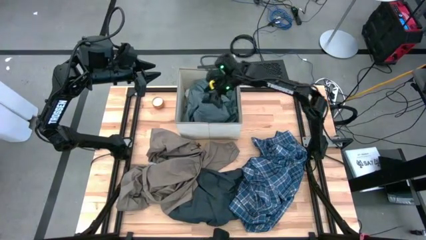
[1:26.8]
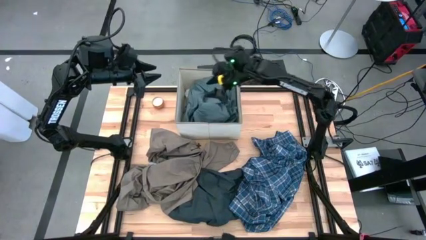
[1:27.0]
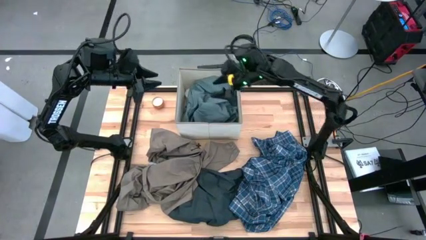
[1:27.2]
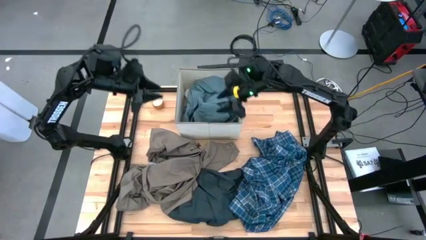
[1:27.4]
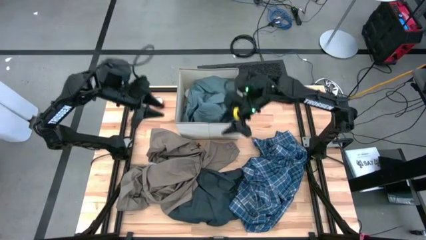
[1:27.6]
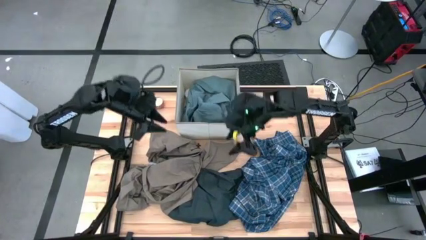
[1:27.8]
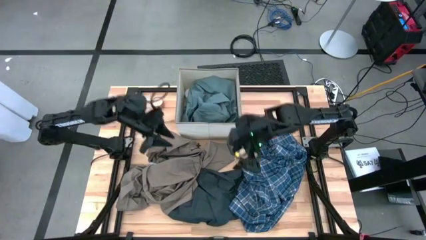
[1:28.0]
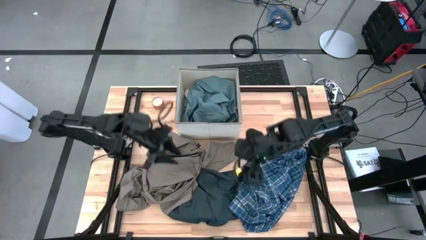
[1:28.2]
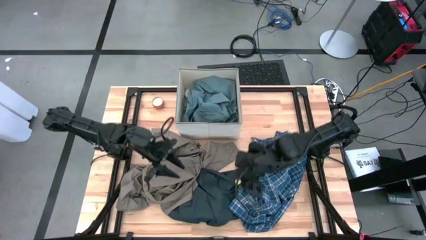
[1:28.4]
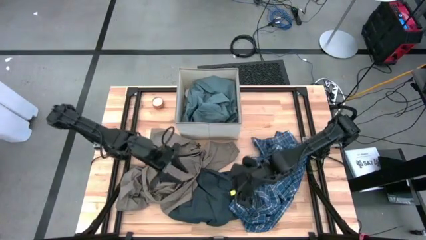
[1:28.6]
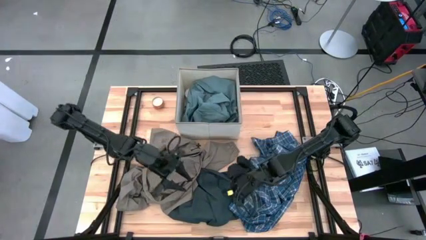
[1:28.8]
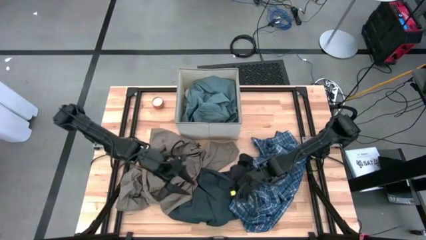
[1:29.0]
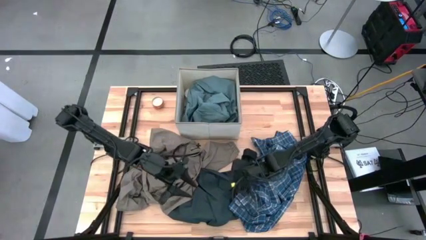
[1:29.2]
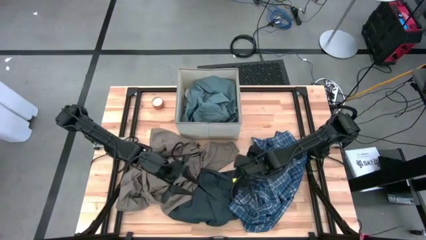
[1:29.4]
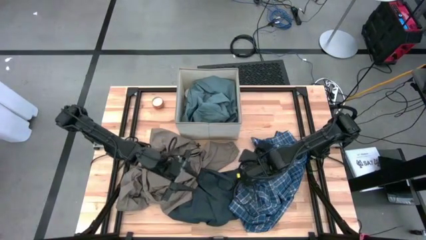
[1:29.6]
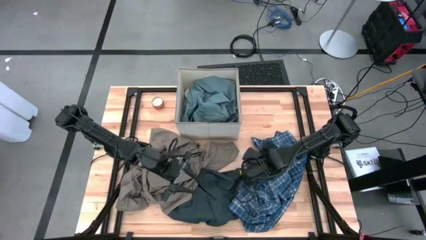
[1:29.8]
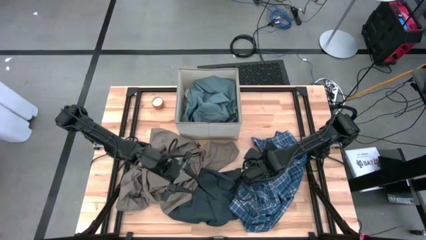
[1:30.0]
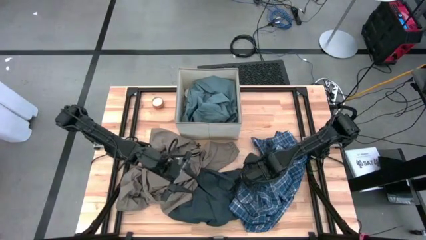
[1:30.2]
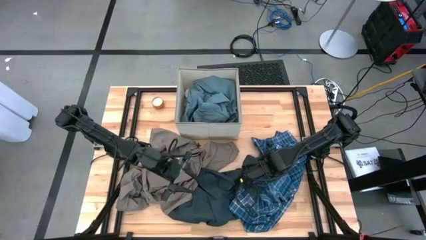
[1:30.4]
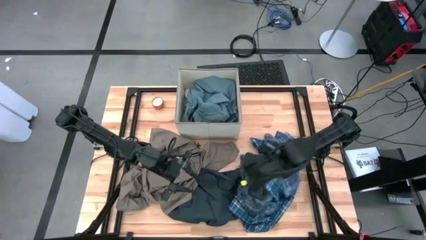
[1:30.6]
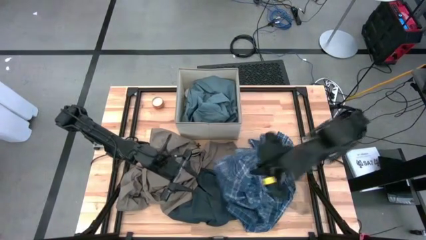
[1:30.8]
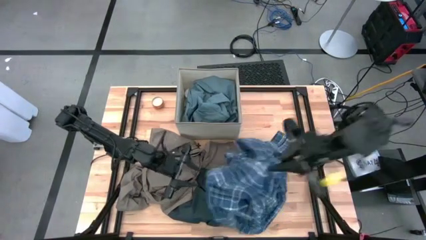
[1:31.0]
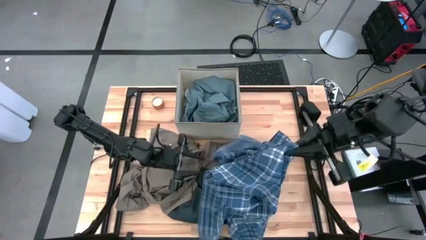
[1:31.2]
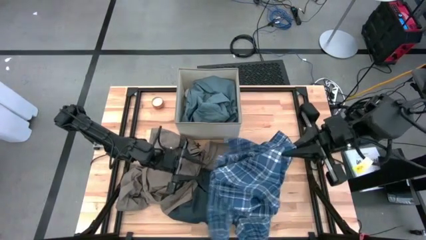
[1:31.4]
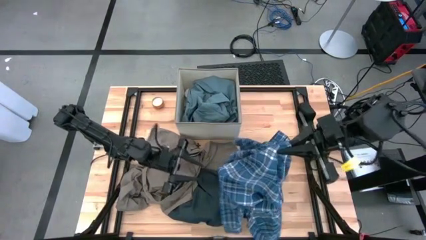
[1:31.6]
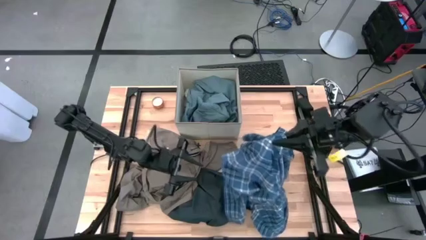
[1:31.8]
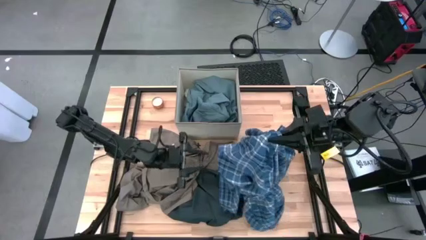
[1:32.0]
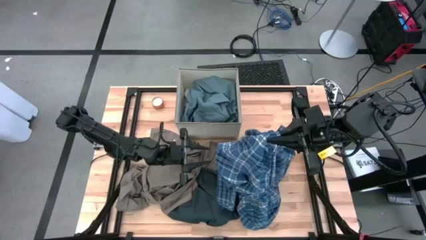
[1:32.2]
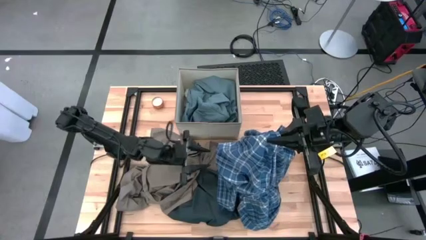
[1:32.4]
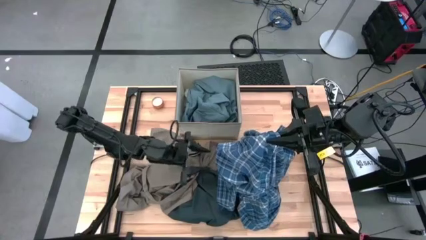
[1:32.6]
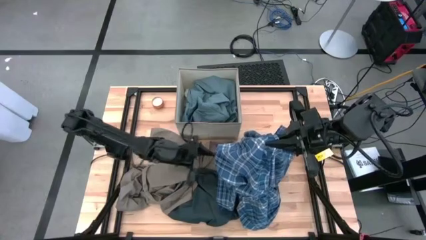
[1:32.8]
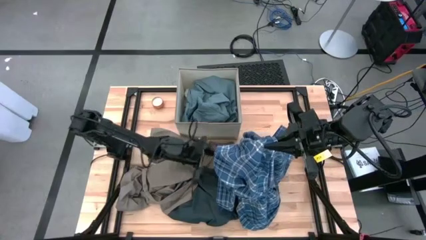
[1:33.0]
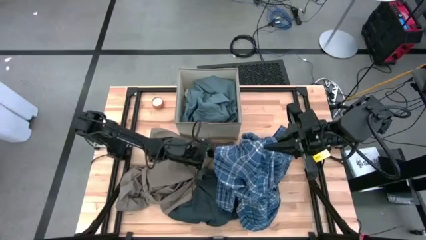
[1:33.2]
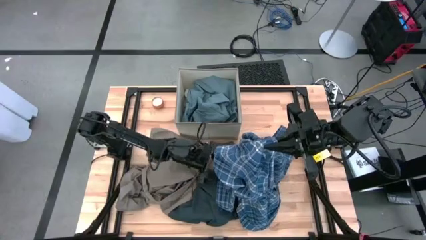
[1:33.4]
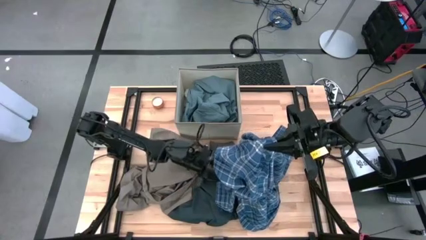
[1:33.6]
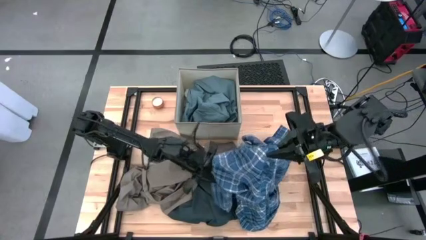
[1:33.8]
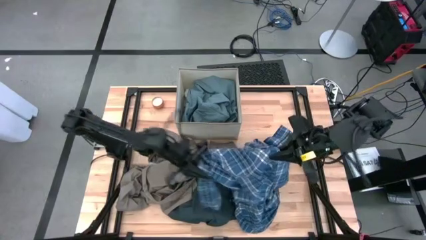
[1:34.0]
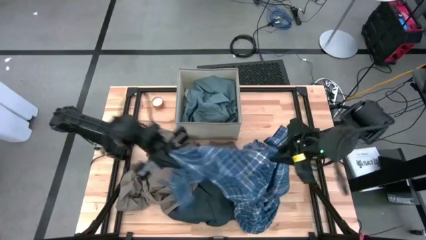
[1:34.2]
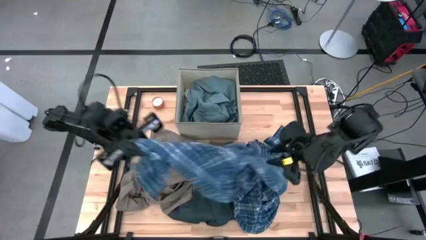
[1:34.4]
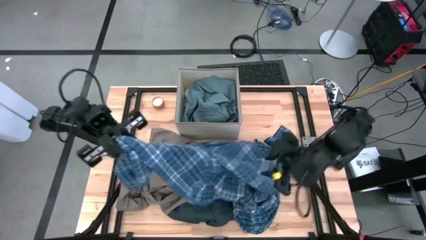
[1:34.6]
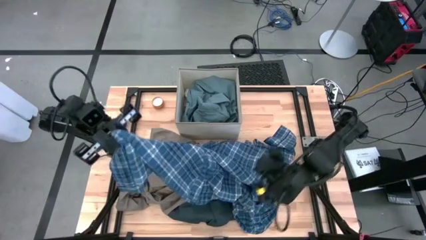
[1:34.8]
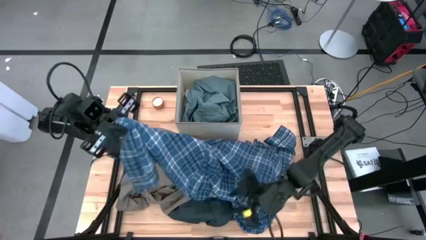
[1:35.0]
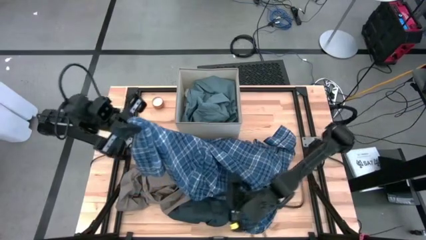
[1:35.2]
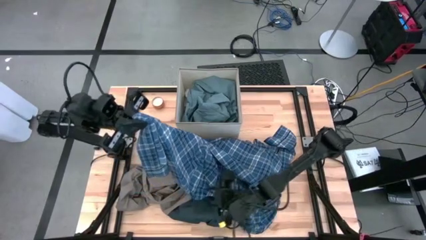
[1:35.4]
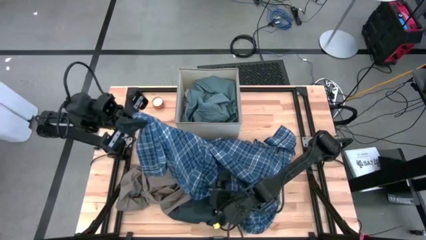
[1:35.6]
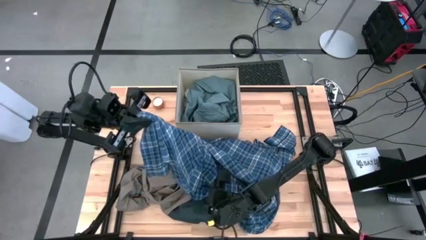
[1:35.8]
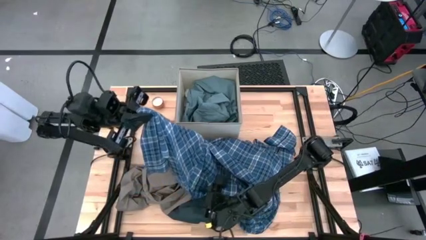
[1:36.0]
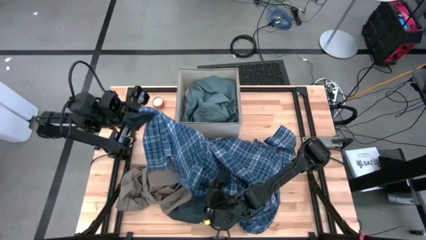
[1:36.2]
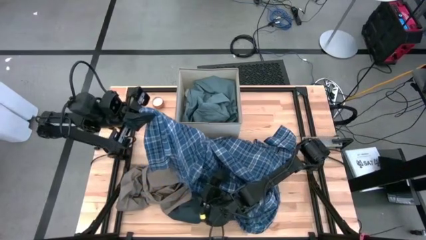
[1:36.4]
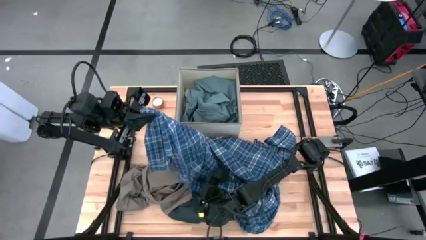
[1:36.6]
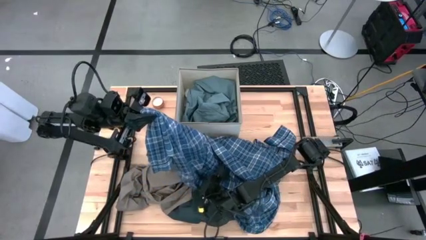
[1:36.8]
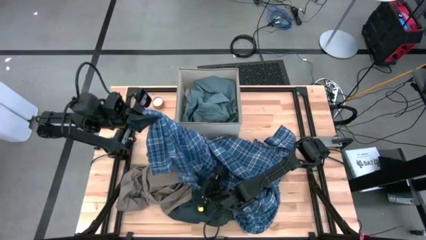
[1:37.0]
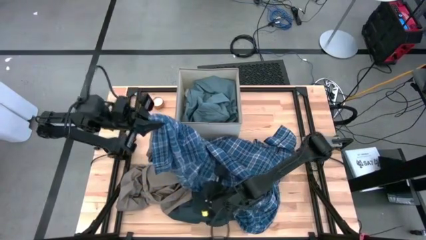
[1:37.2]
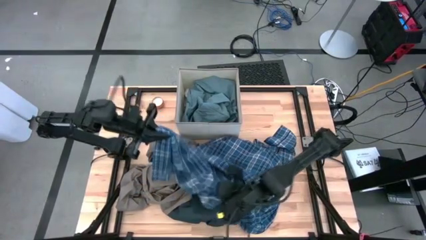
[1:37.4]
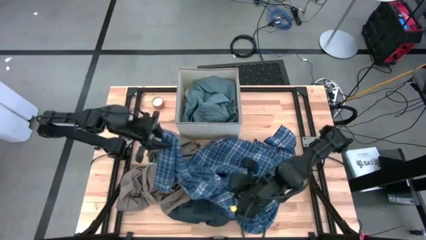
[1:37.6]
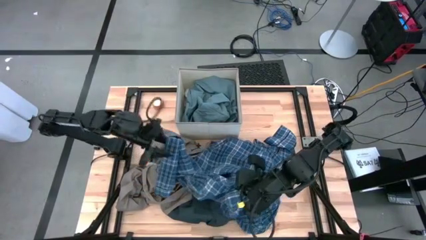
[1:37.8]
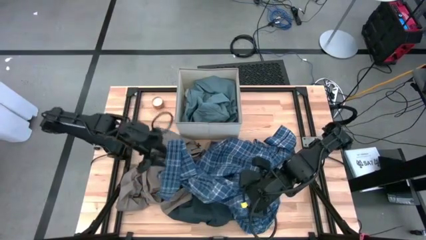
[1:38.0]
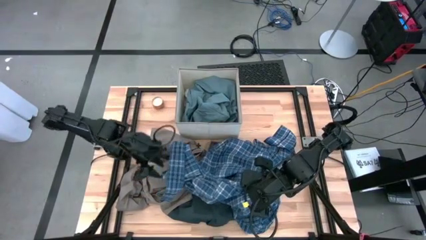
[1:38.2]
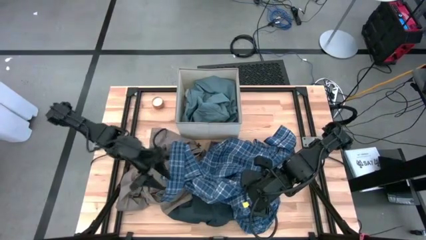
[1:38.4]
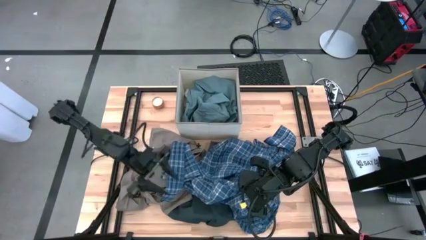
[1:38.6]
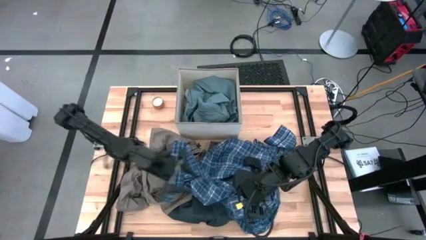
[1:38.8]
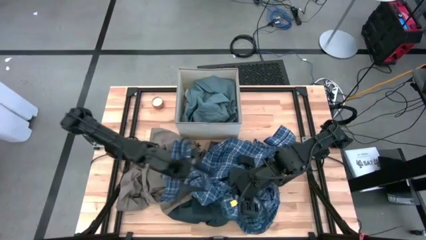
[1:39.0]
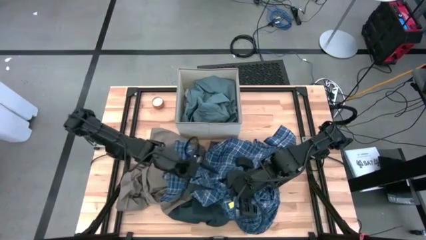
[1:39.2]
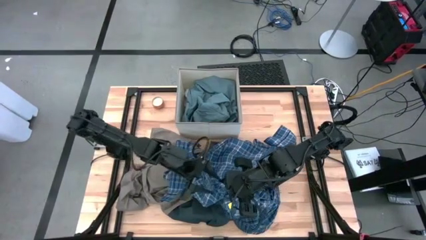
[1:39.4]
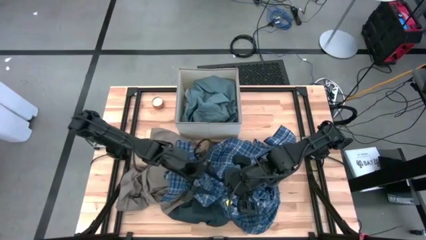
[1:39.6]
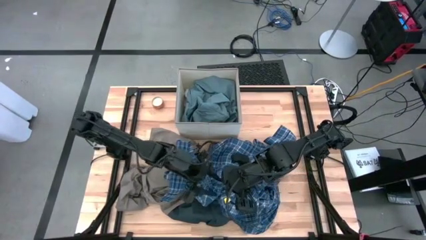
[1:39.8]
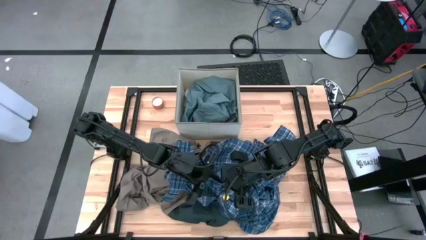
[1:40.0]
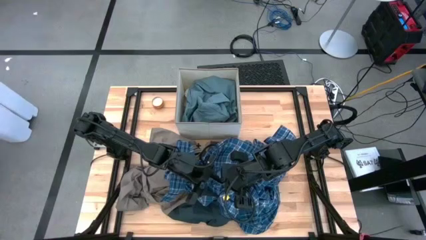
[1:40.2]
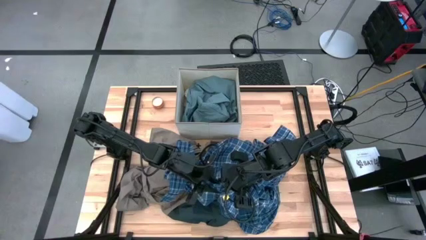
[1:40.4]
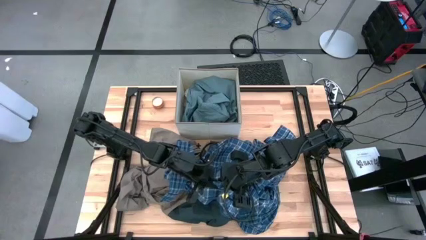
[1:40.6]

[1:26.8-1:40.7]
Task: Sort clothes
Put the blue plaid shirt into the laundry bin
